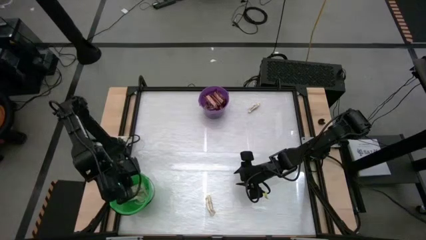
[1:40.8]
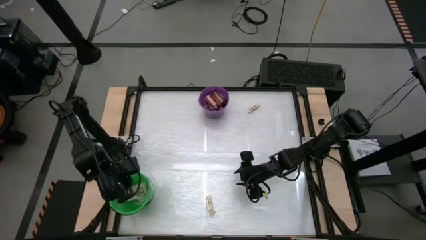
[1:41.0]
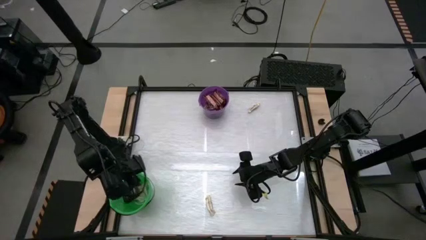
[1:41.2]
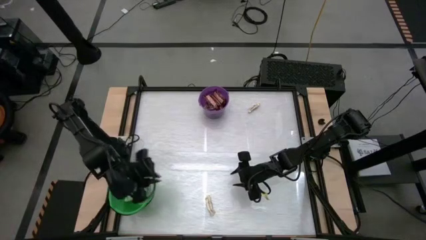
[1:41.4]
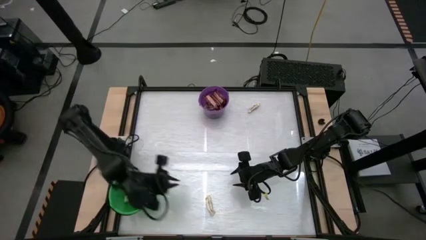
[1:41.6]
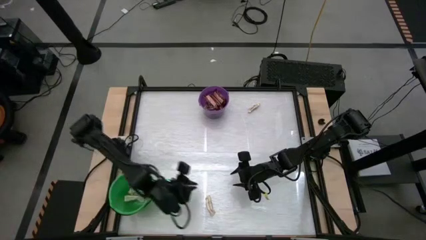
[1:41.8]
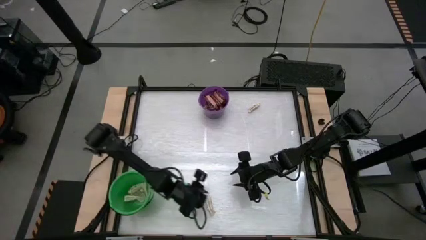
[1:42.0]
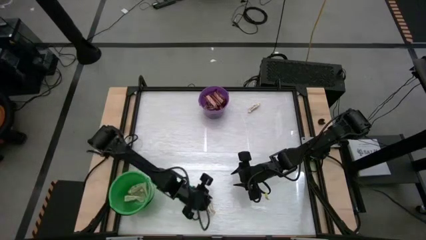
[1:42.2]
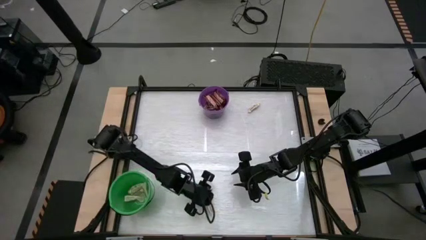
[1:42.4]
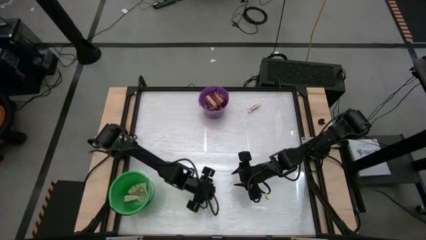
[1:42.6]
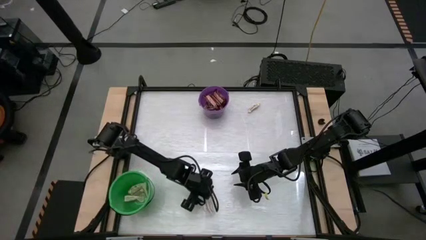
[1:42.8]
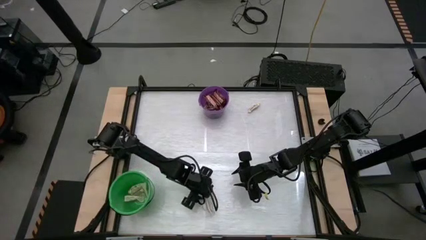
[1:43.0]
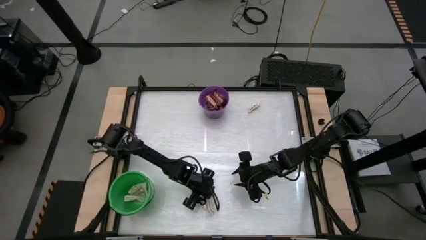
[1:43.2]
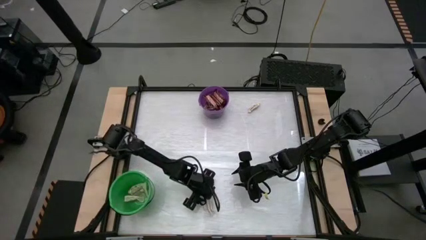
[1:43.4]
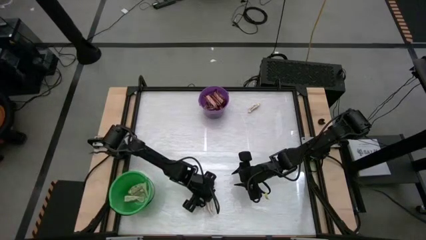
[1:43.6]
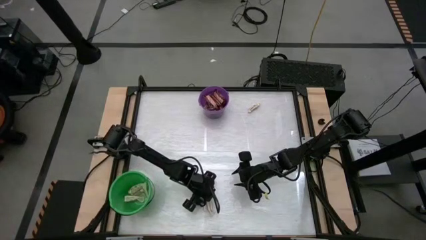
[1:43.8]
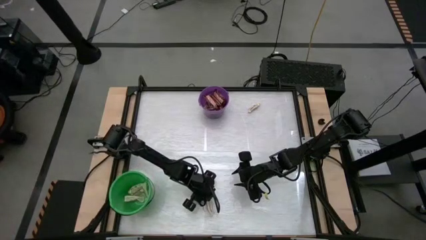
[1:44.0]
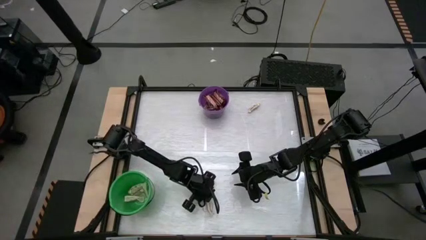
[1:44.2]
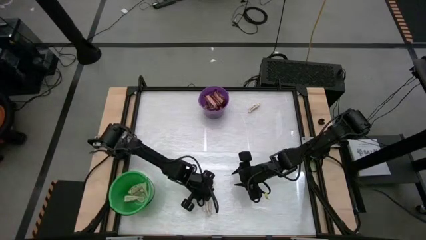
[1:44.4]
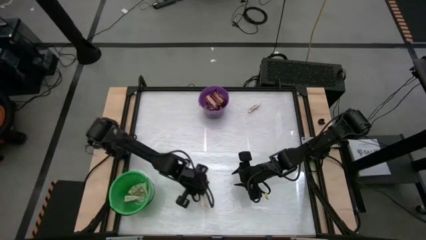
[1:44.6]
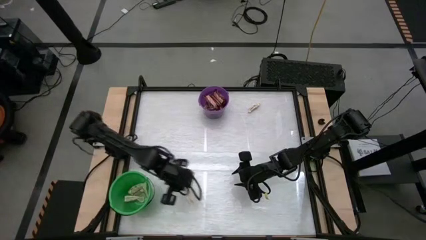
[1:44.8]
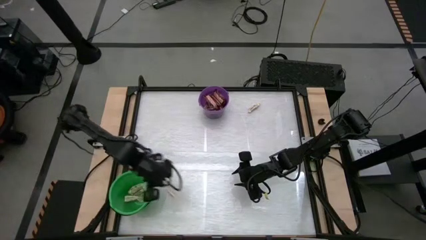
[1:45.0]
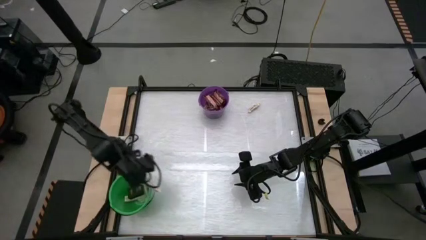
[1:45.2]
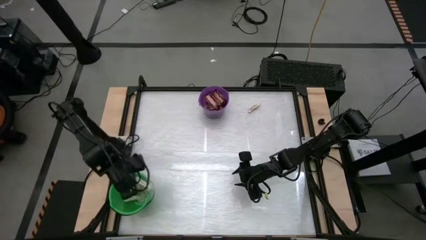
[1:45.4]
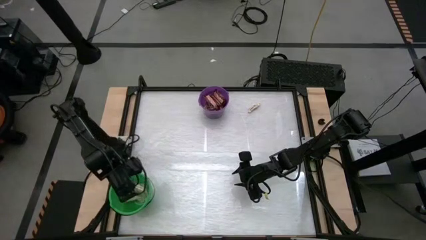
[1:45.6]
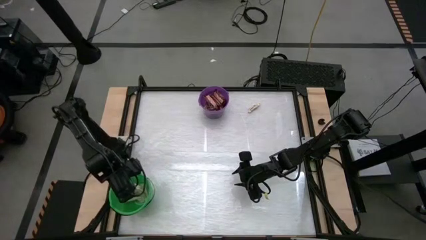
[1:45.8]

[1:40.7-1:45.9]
Task: Sort candy by brand, put in halloween buckets
Put the white chocolate into the green bucket

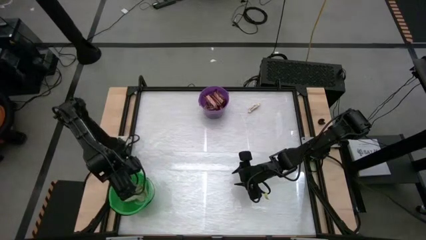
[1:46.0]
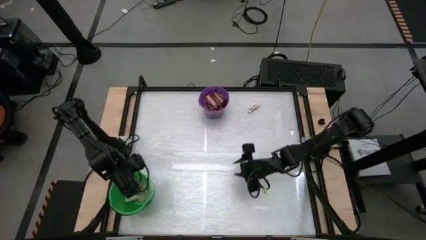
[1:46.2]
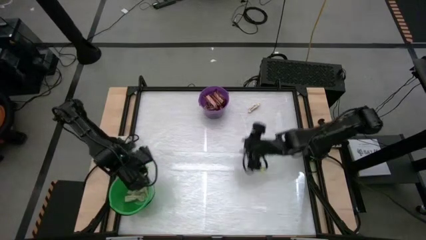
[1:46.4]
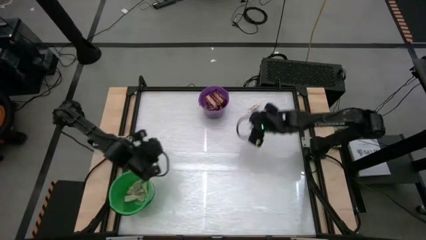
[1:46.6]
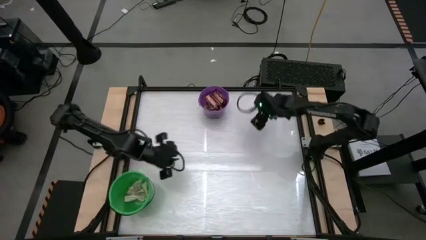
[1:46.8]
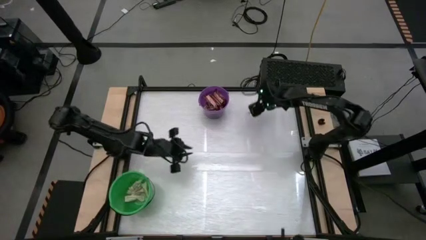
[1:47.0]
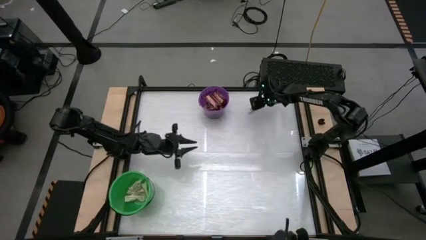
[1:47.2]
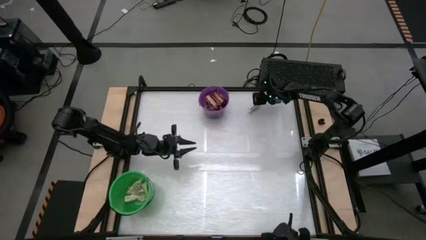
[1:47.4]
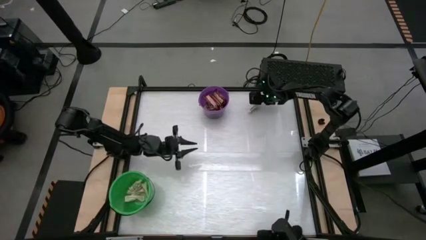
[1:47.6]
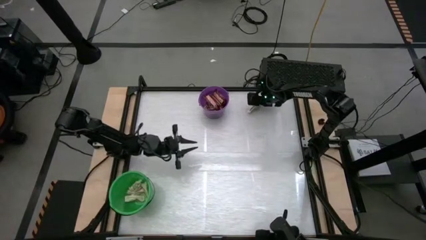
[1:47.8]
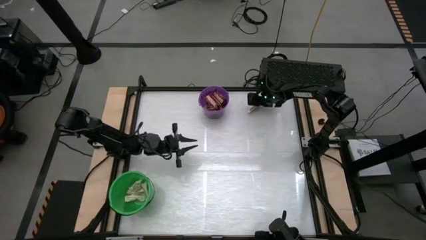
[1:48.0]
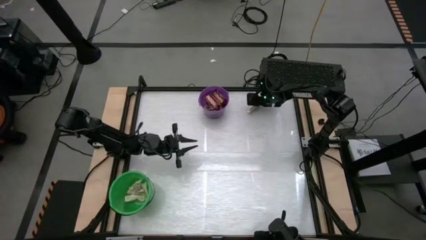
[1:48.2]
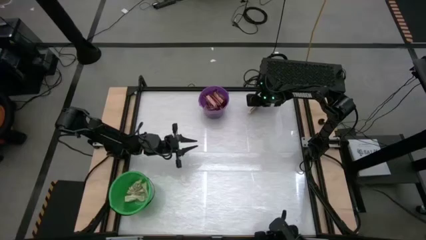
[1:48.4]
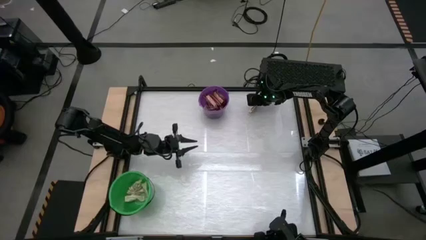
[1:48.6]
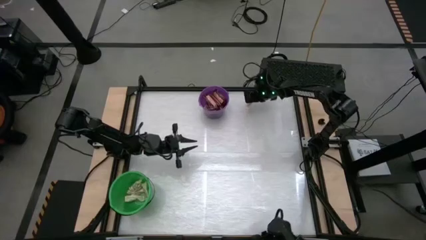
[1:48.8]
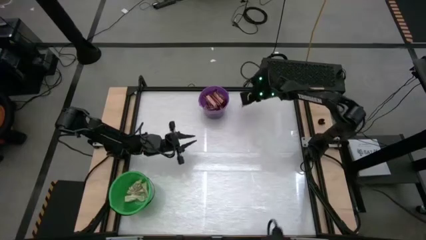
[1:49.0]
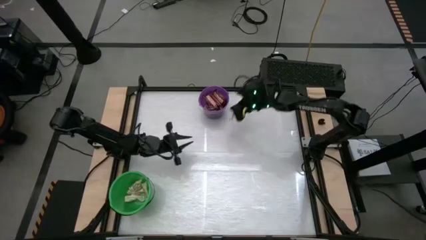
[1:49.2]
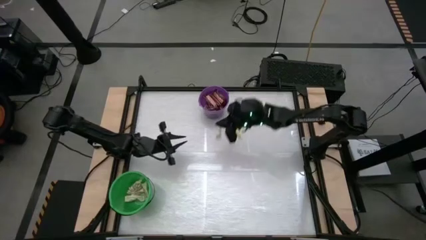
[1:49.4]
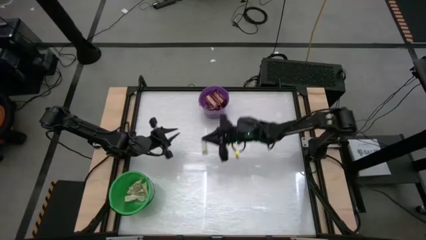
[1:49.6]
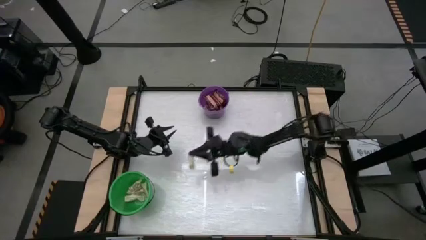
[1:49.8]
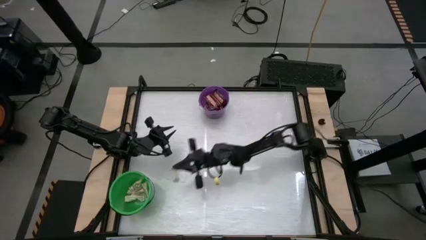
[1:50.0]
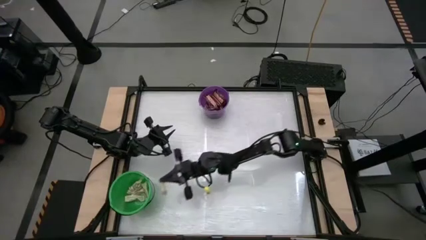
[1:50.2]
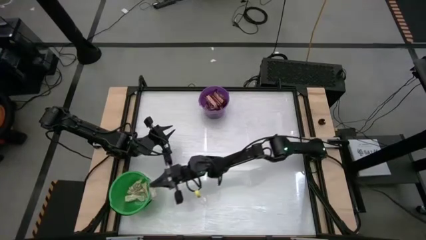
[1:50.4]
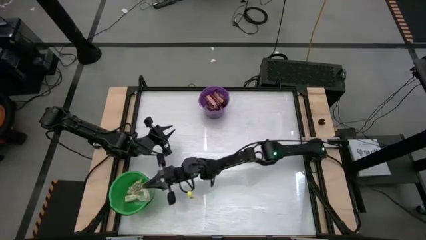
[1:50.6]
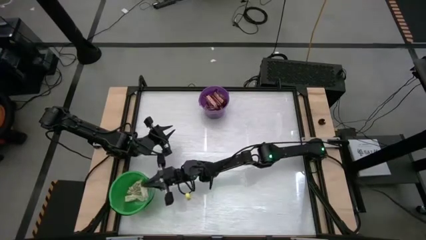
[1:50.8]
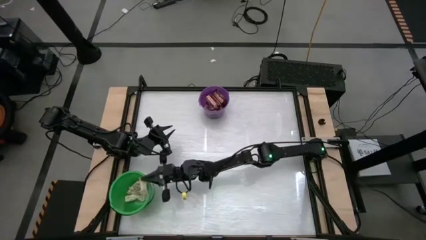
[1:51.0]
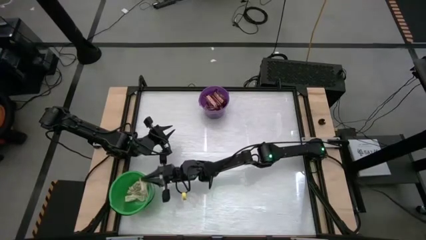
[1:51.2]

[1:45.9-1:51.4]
Put the white chocolate into the green bucket

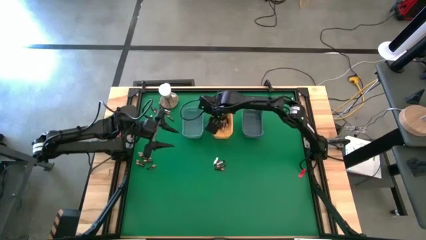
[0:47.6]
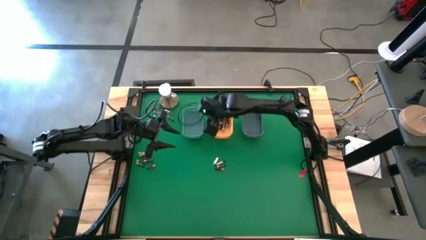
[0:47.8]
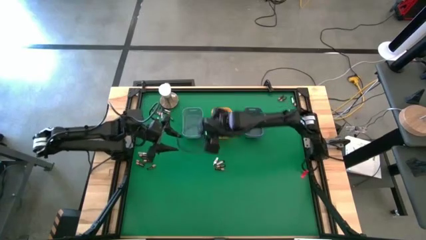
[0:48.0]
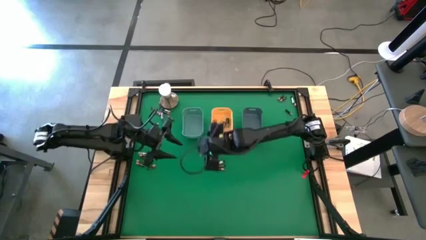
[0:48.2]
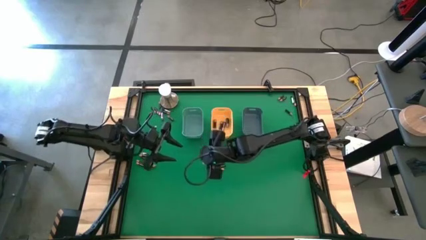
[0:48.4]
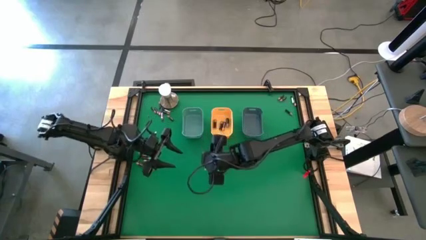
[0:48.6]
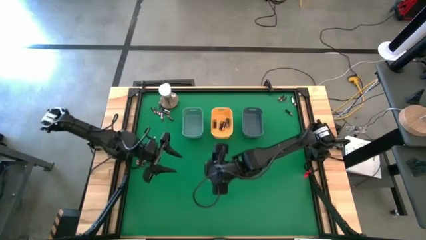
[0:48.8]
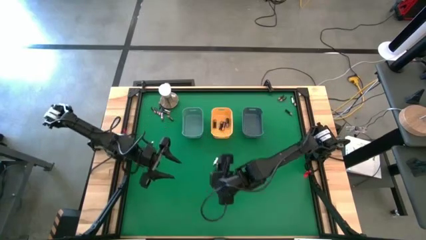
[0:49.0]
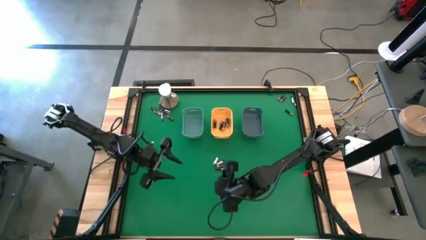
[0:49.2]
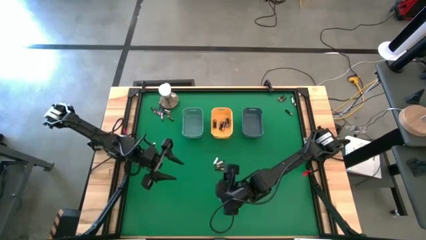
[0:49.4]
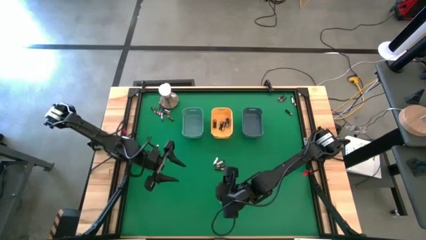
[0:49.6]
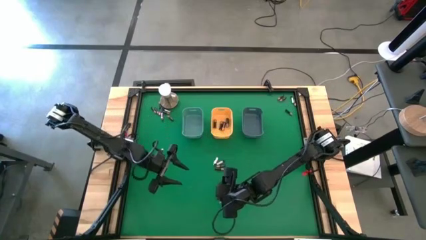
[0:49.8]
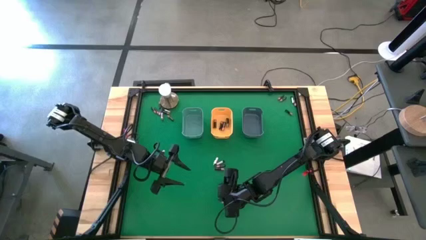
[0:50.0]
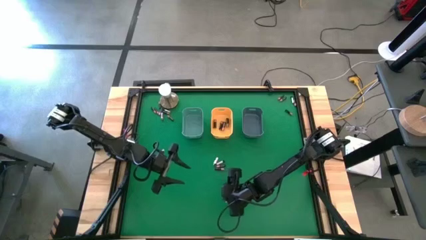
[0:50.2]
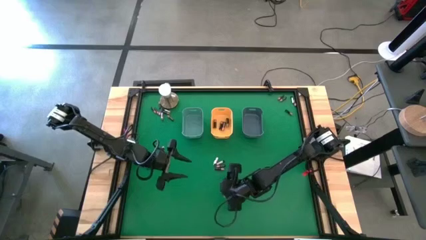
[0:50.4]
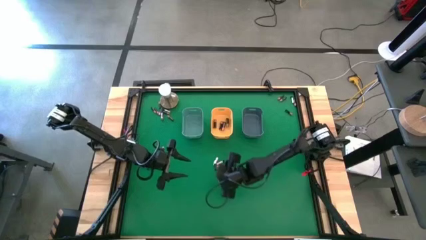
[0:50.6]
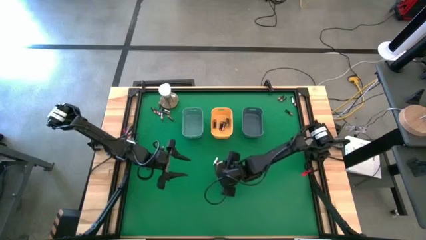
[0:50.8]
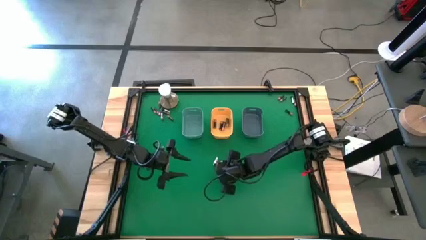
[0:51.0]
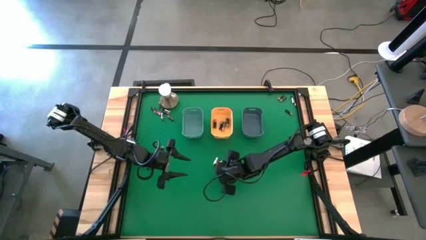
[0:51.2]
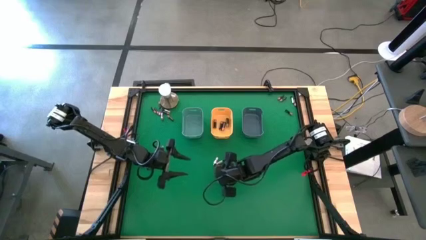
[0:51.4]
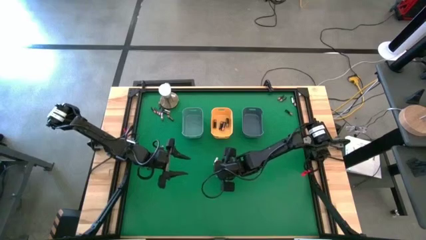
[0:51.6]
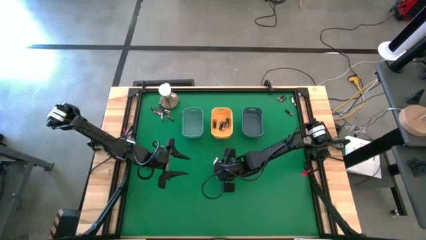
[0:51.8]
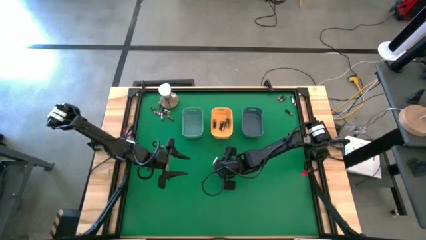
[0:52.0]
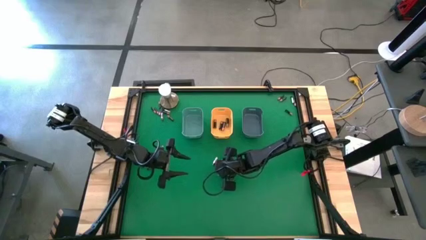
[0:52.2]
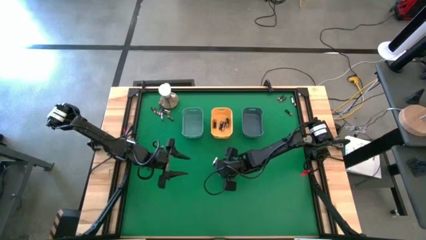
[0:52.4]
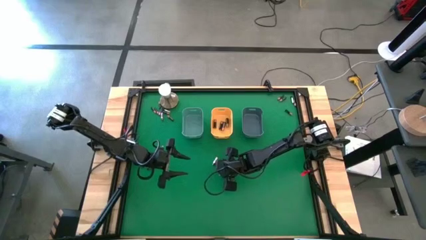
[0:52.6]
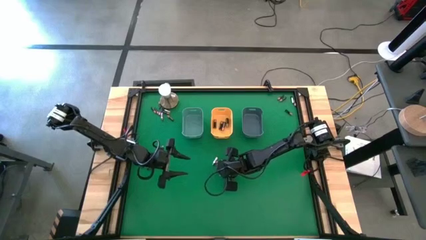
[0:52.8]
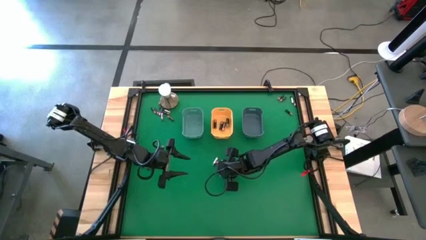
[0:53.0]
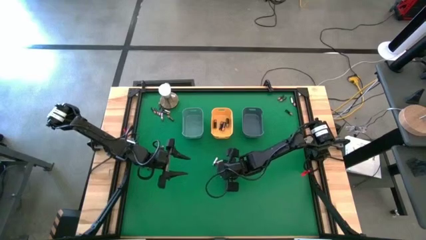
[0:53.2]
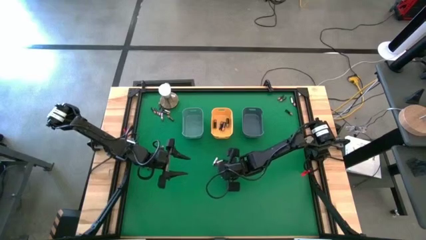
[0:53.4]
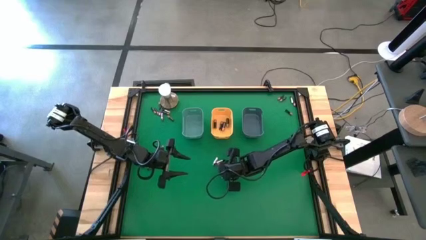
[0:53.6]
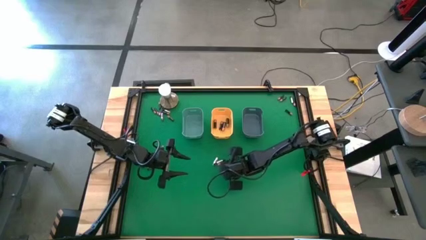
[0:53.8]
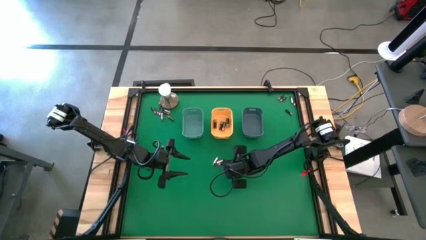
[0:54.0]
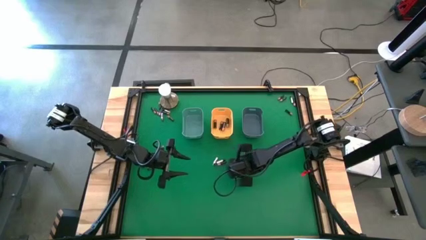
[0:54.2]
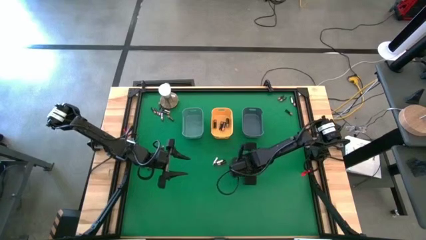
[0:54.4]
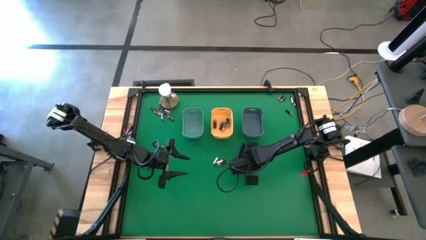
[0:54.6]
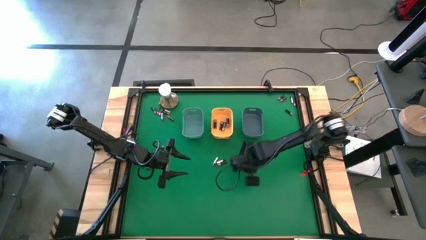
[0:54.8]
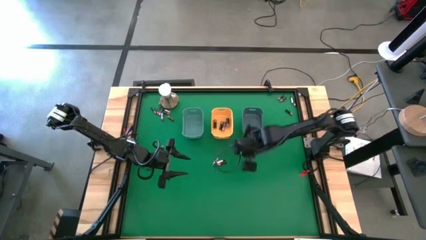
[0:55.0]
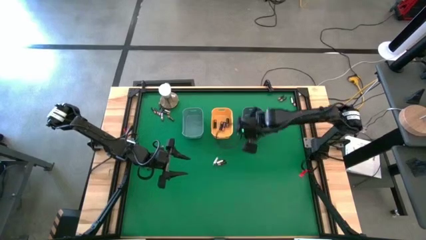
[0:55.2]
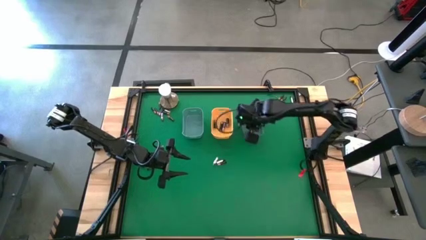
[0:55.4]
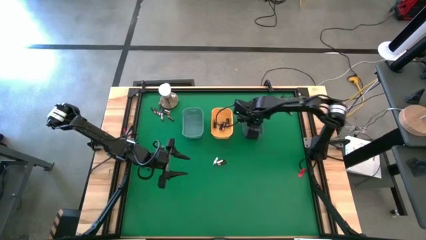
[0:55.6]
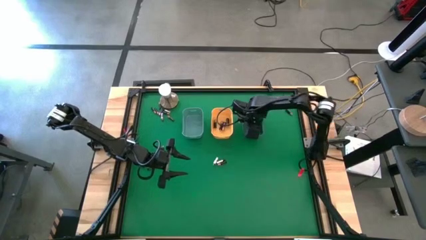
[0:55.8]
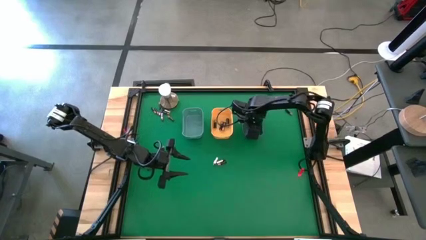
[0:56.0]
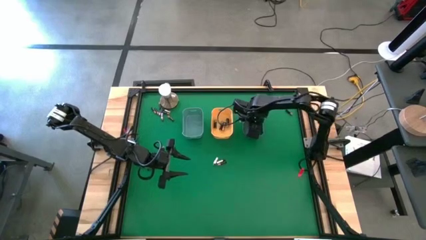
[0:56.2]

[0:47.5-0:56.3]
Task: Sort batteries
Put the small black battery into the blue bin
